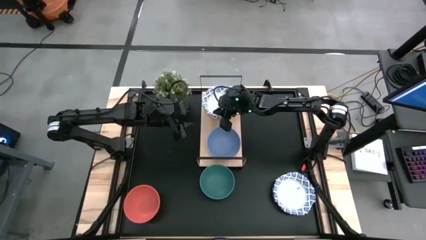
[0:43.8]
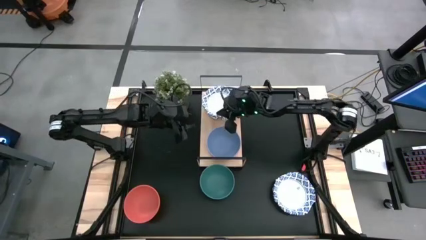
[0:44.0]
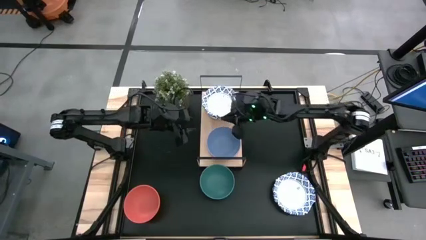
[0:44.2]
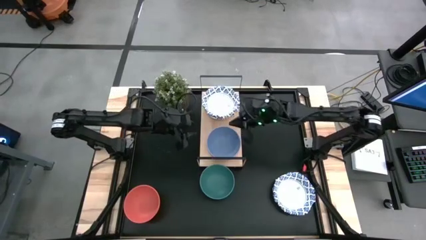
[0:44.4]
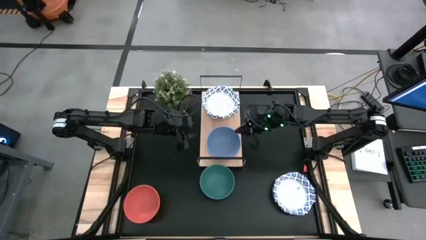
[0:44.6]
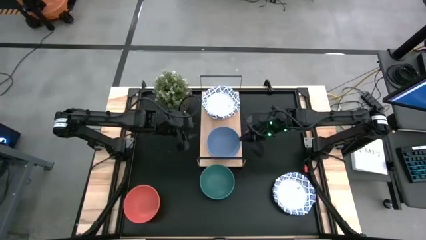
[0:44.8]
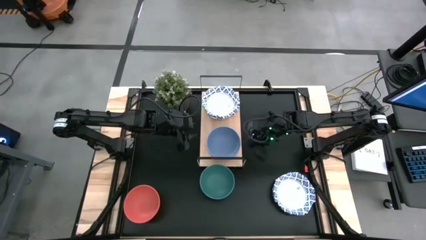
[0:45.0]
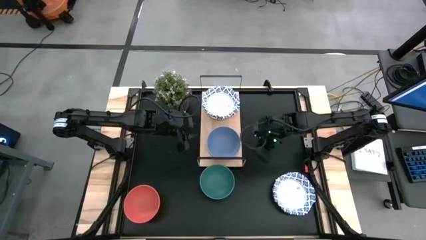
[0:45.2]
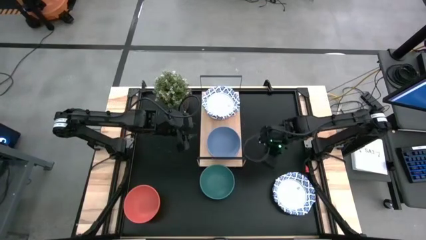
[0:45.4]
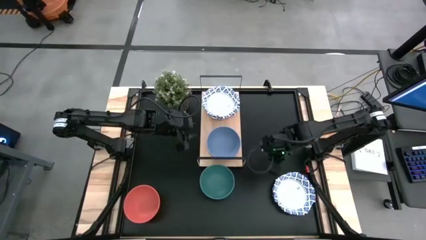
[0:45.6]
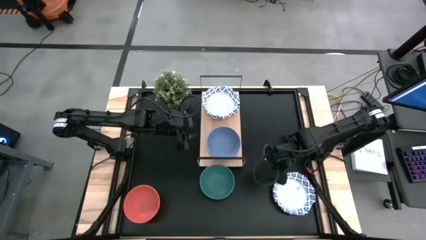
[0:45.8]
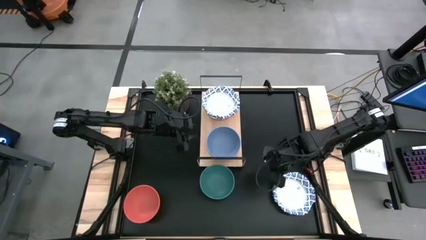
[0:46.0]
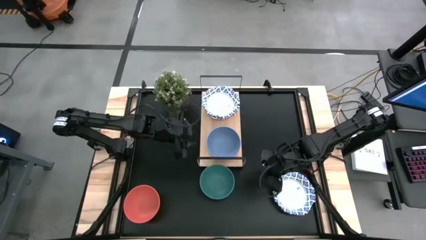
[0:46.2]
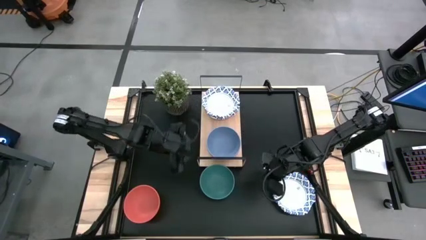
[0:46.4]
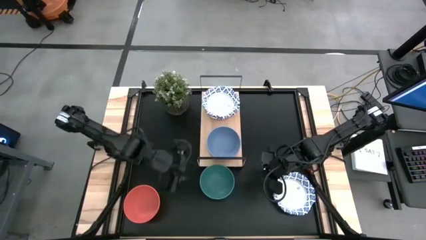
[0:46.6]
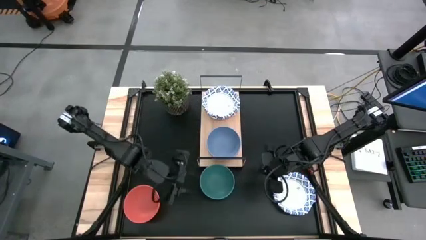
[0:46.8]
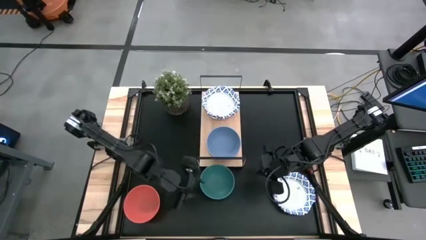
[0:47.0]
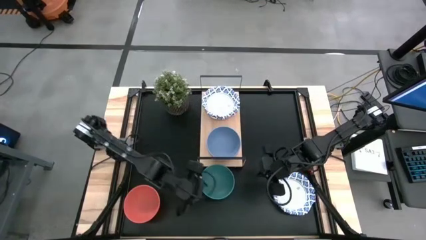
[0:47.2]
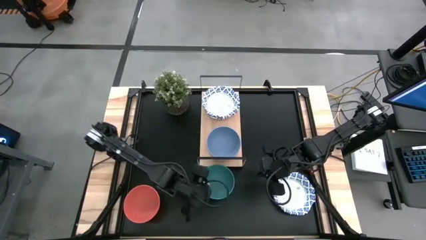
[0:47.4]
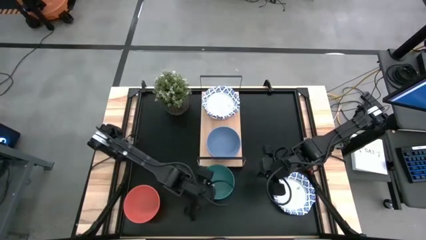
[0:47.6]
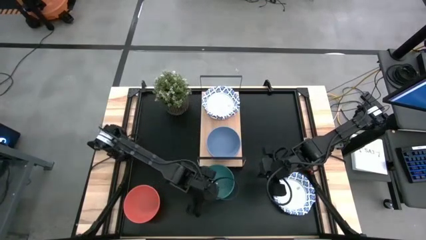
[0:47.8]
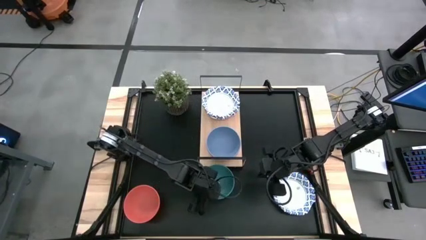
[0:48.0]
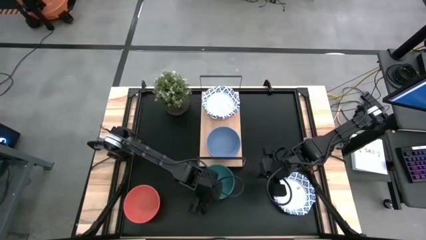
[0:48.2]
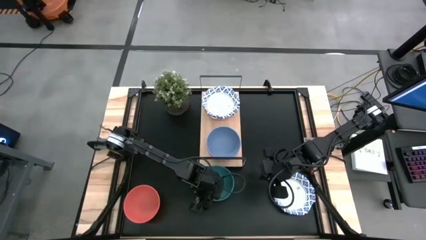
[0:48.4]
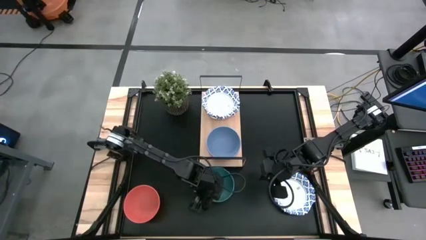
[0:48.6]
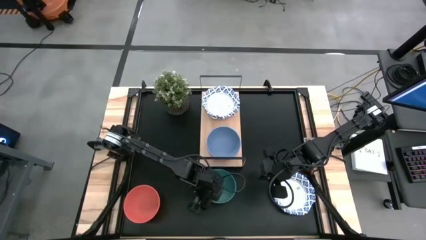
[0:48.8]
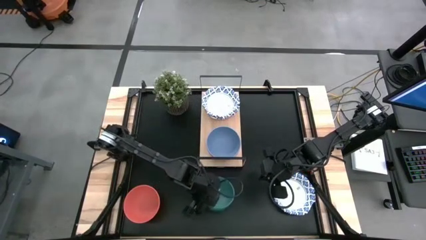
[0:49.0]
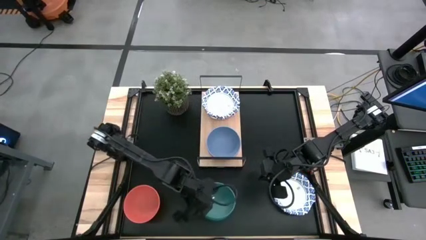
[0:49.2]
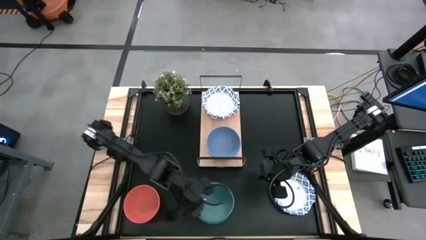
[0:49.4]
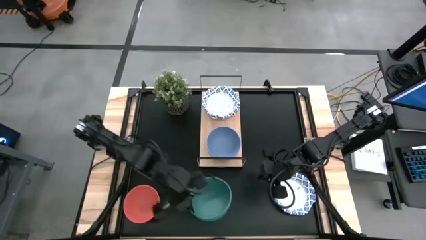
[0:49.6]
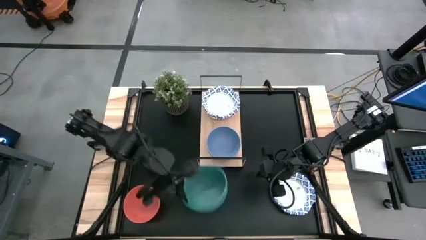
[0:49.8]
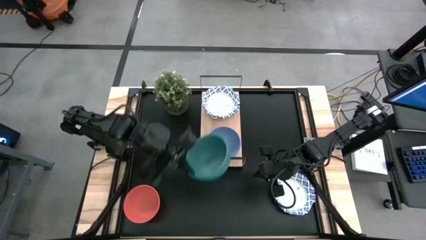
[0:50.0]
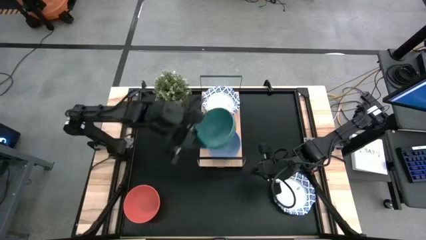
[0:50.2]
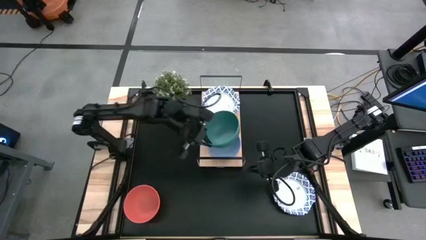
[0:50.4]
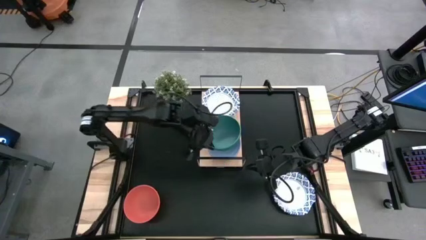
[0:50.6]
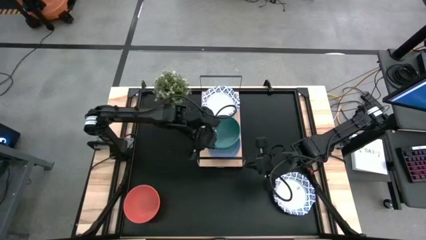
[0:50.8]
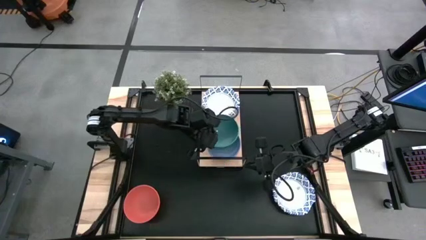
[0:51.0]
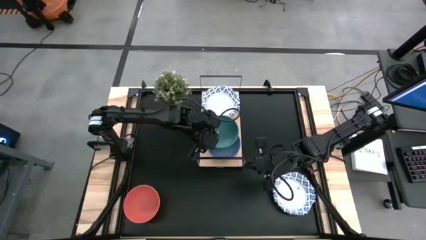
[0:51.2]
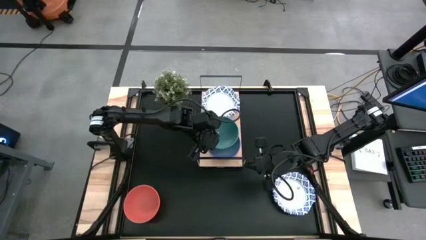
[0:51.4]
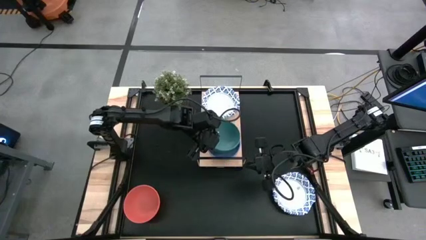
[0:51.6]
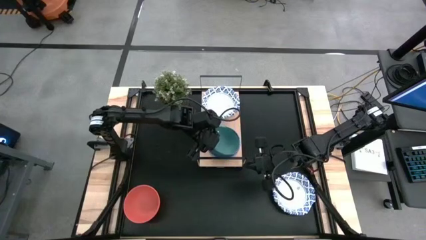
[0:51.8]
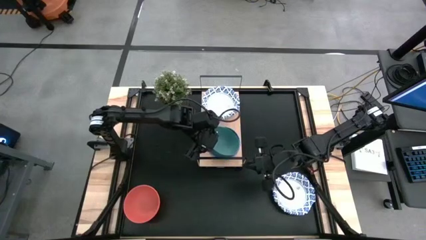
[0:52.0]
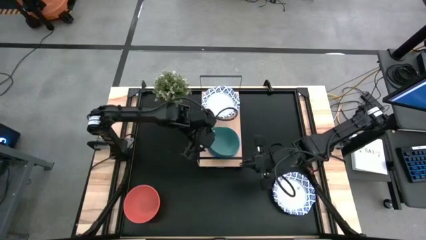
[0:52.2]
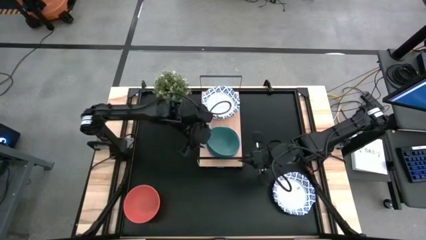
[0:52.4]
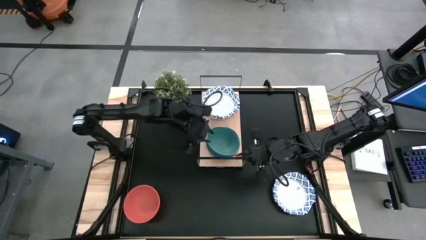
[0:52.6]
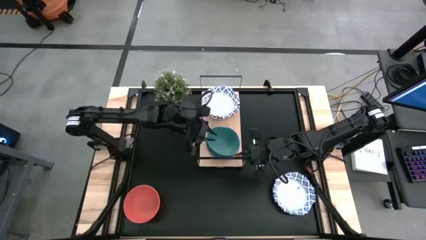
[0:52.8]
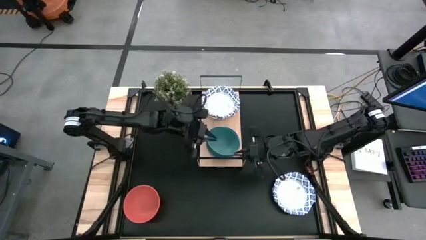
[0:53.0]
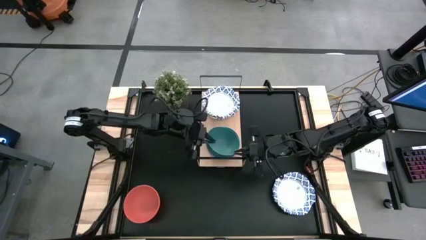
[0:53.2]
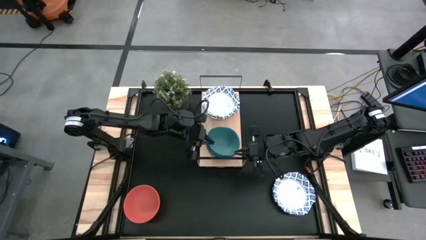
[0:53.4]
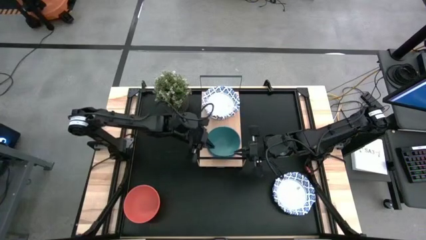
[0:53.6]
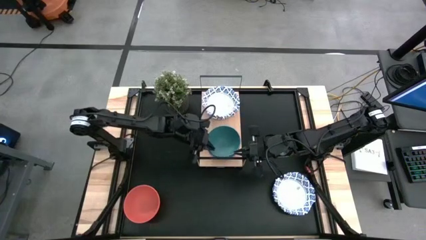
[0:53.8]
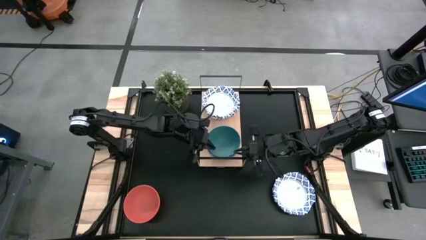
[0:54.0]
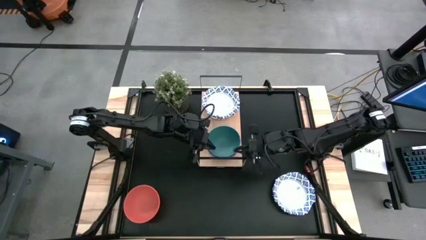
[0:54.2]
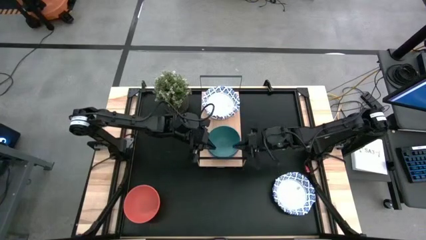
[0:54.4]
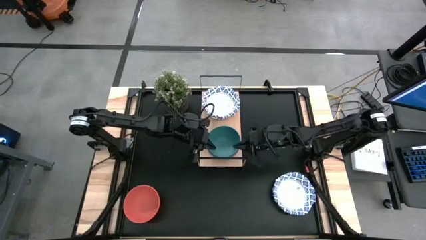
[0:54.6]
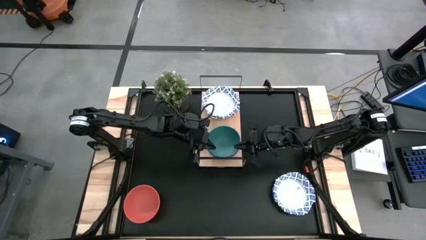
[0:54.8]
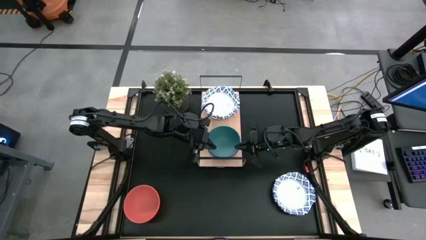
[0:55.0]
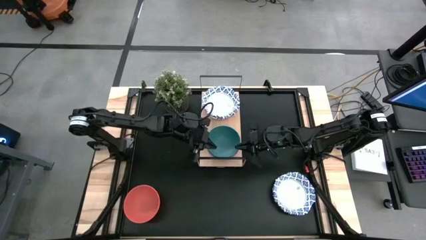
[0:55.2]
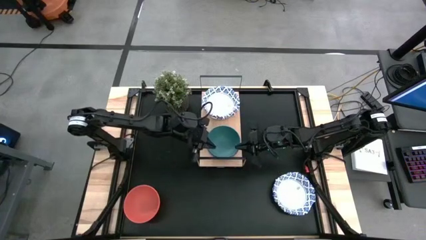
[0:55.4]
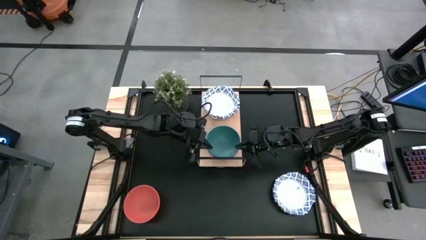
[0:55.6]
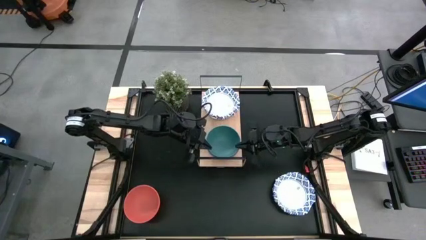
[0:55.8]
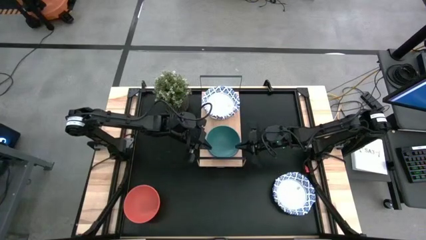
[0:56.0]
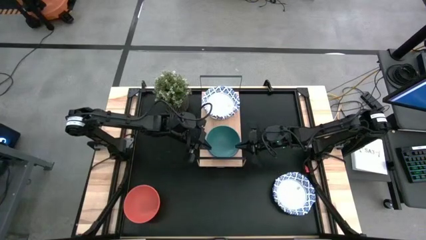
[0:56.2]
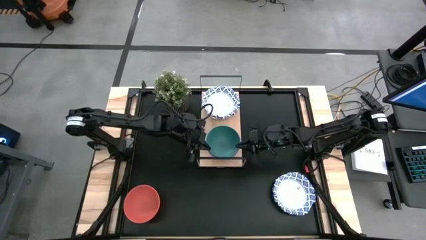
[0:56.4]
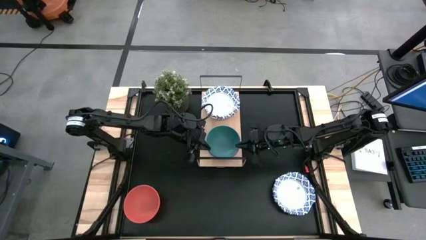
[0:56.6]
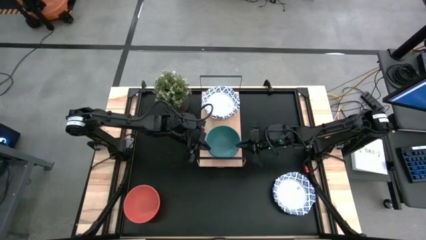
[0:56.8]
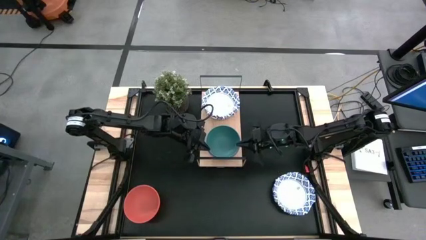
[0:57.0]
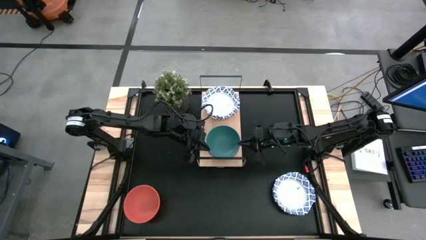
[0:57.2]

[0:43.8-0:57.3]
Task: Place and stack bowls onto a shelf
Stack the plastic green bowl on top of the plastic blue bowl on the shelf

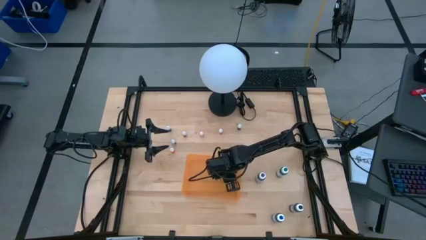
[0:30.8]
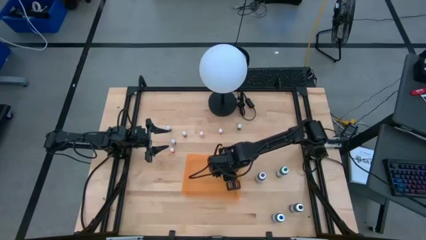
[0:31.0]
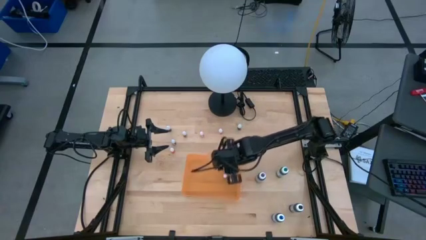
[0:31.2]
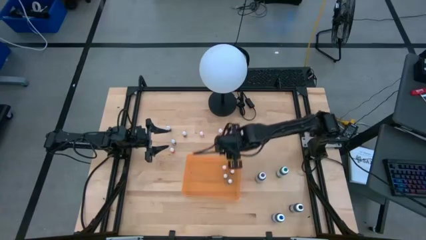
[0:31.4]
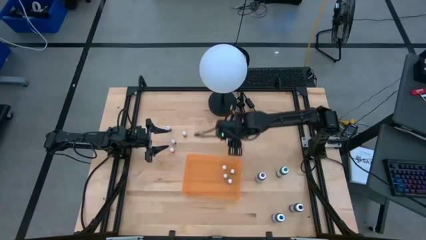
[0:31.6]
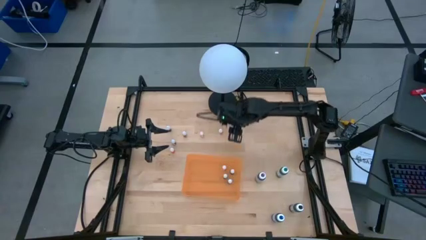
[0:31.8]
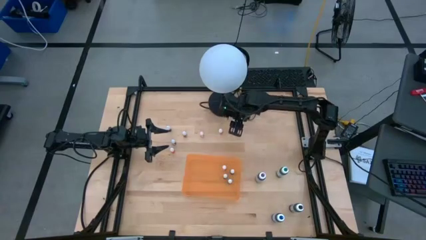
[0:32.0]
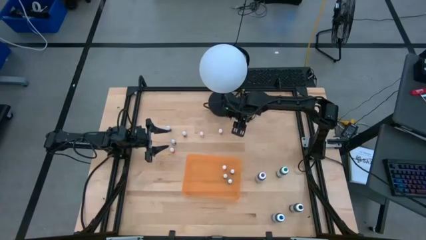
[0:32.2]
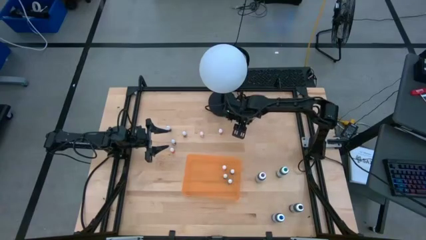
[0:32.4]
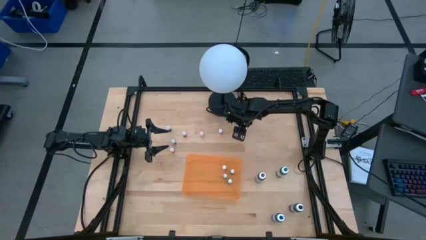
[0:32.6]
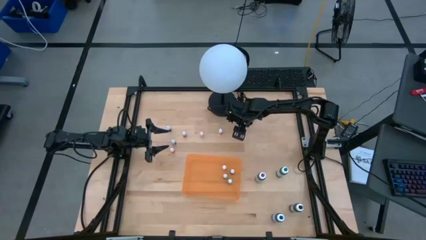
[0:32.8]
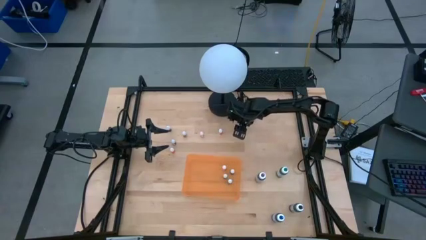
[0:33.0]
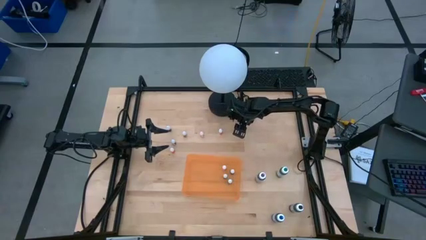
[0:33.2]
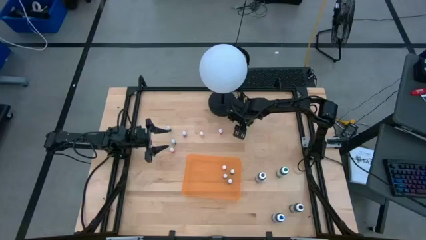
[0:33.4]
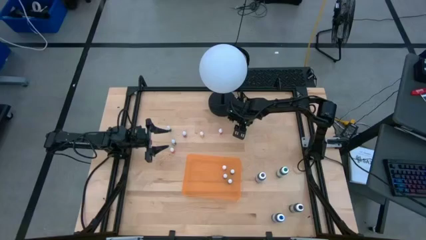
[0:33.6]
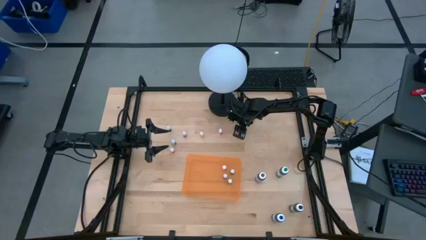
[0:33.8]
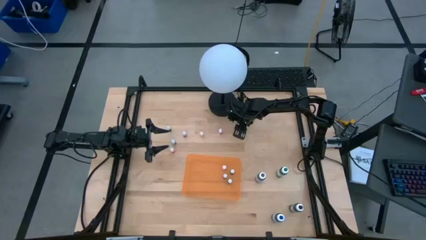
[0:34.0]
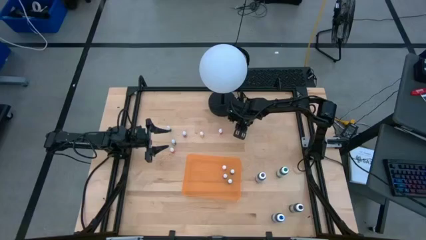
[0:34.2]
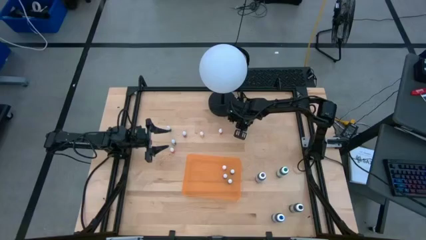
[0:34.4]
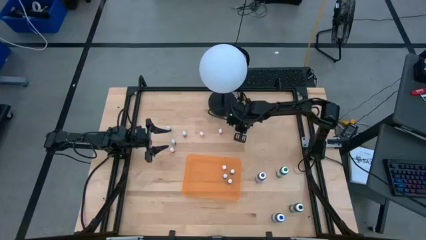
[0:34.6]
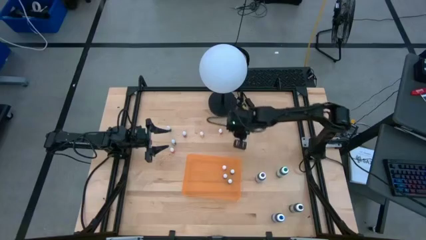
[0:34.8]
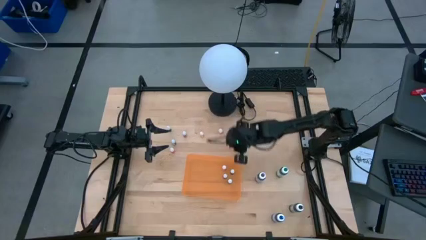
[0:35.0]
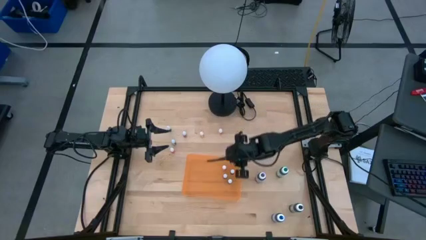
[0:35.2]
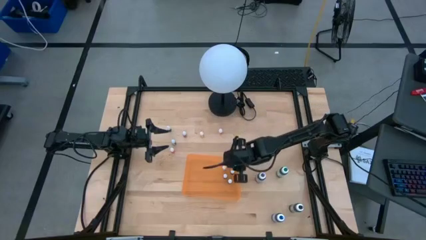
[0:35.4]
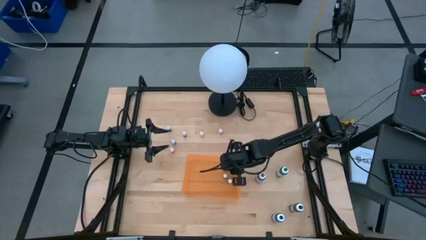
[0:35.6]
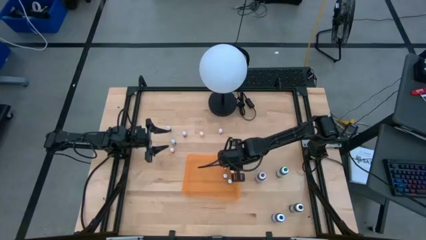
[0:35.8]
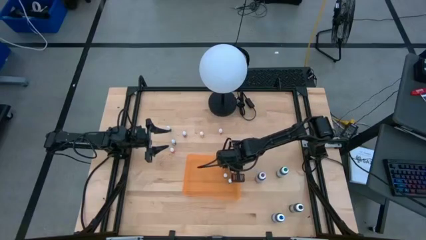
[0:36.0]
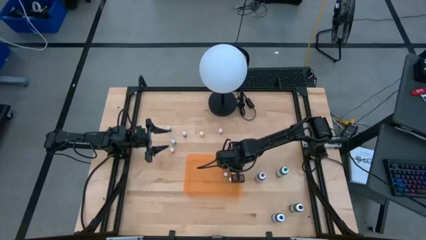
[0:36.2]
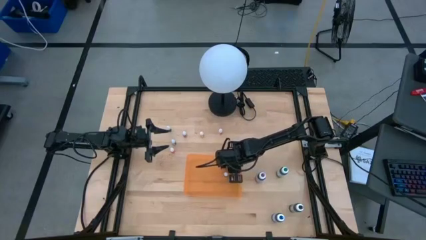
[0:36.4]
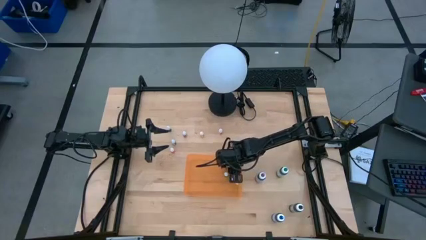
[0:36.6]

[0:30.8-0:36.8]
Task: Pick & Place food coloring
Put the small black food coloring bottle into the orange container
